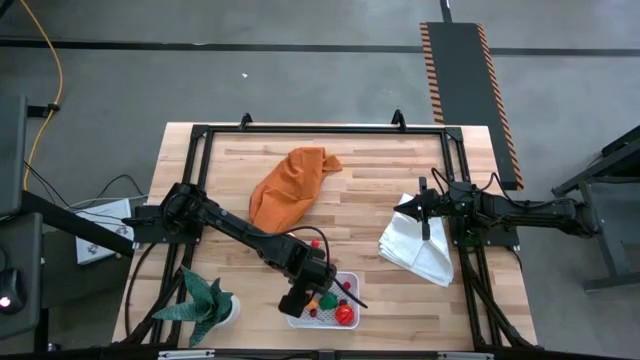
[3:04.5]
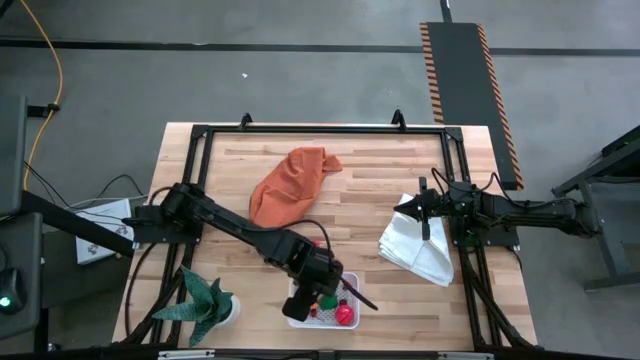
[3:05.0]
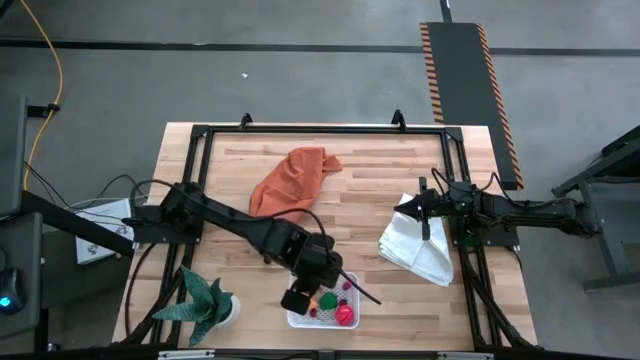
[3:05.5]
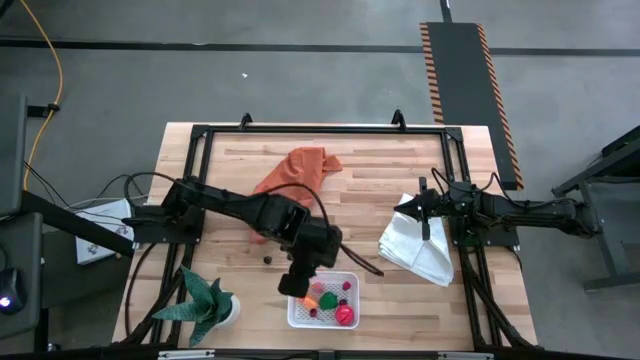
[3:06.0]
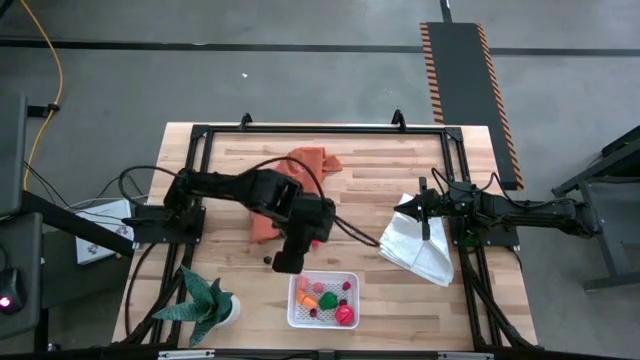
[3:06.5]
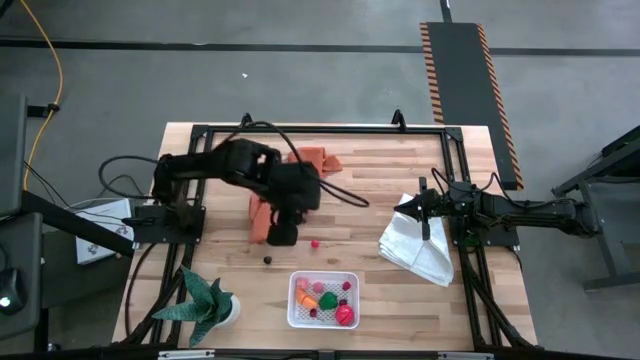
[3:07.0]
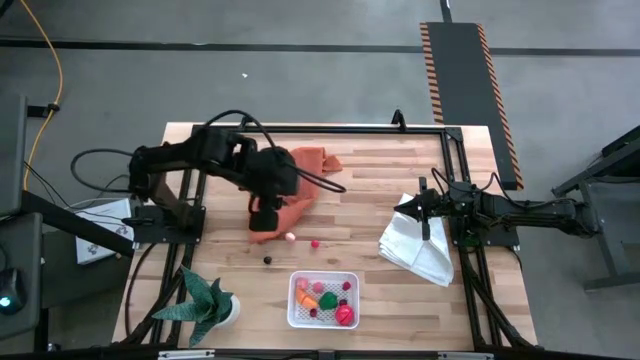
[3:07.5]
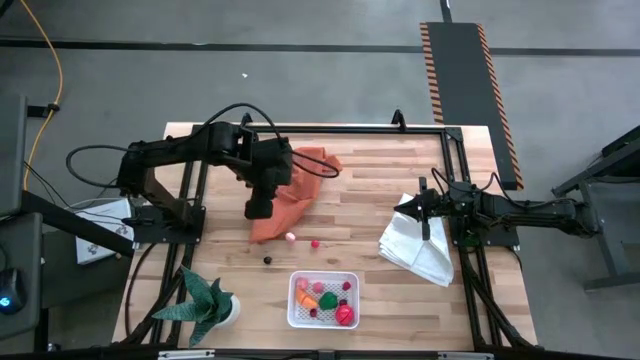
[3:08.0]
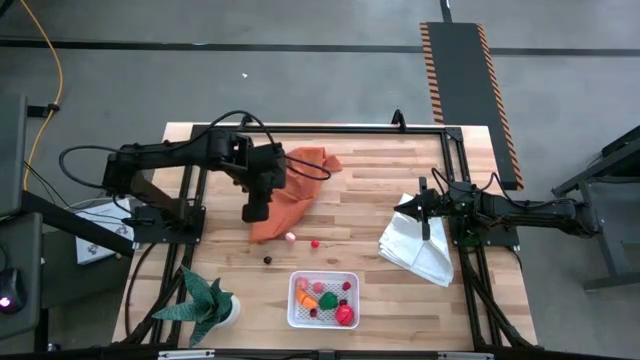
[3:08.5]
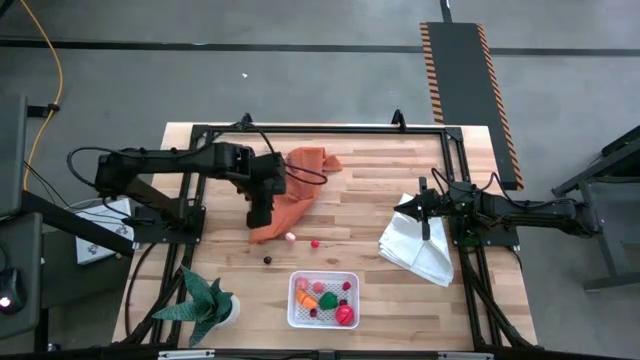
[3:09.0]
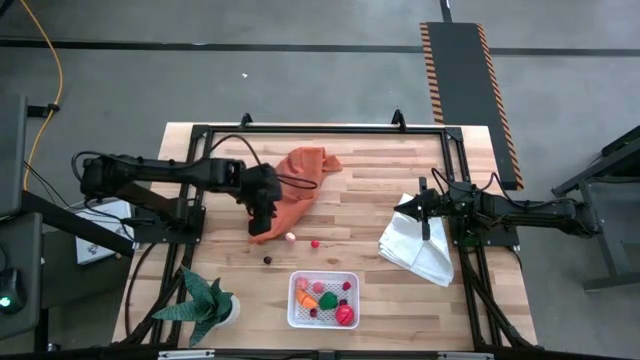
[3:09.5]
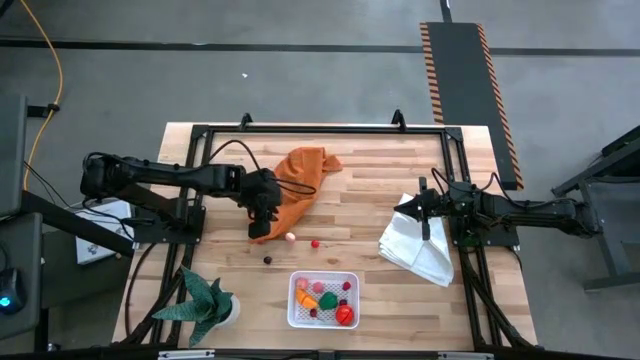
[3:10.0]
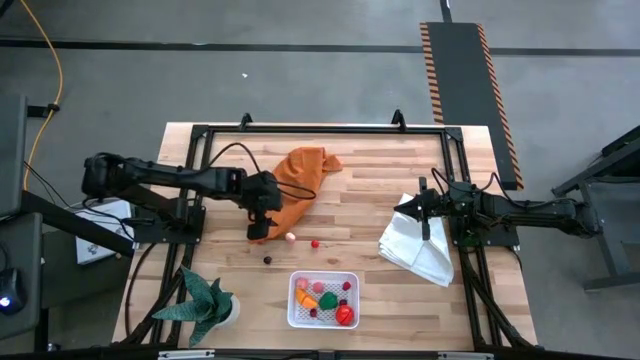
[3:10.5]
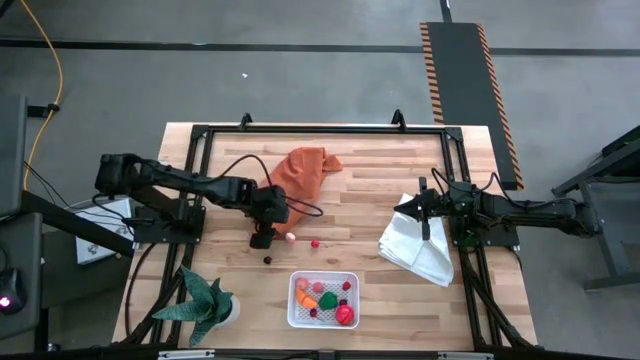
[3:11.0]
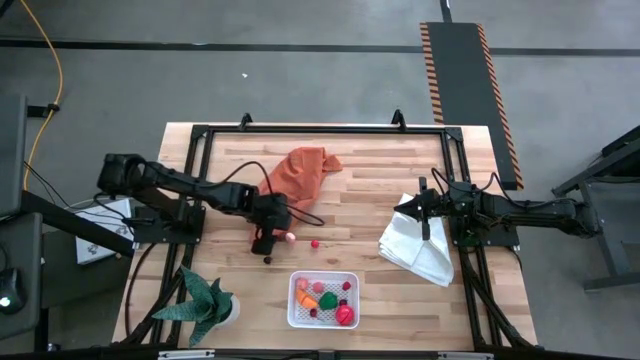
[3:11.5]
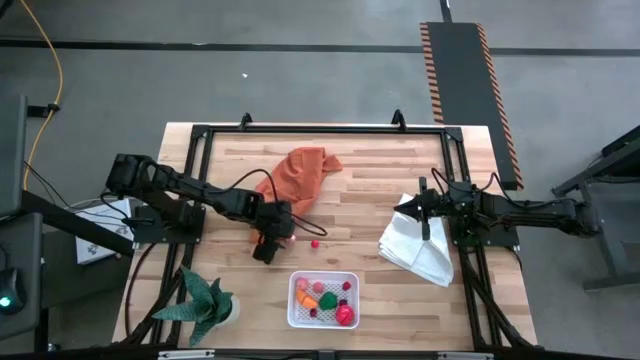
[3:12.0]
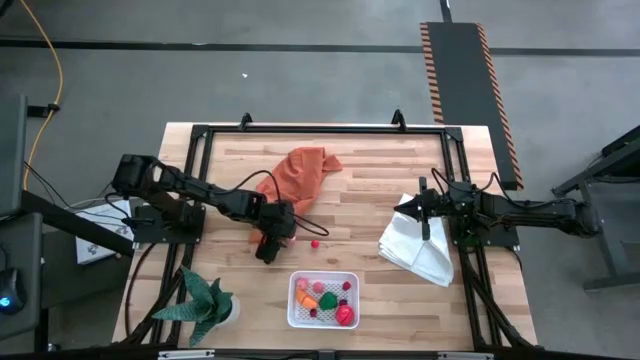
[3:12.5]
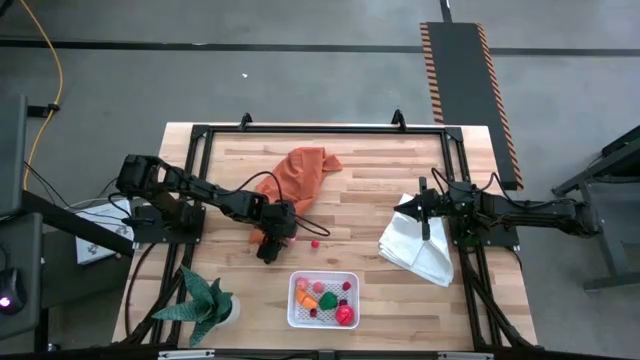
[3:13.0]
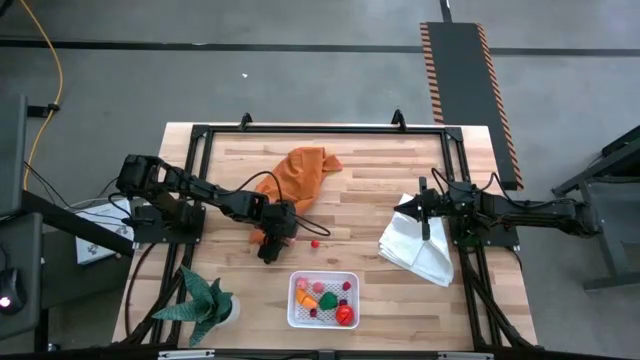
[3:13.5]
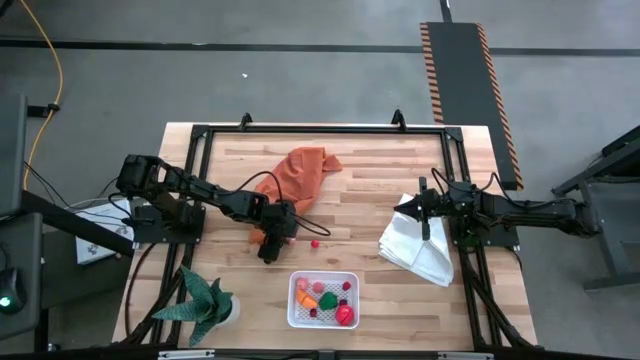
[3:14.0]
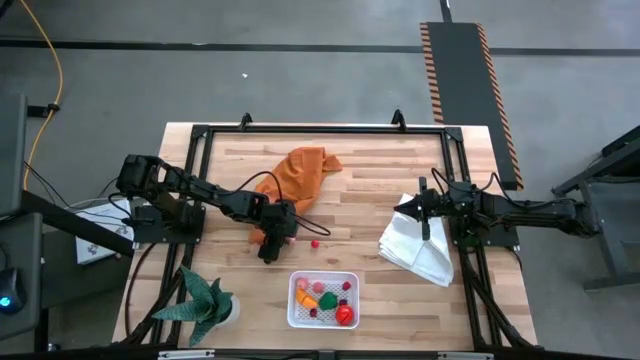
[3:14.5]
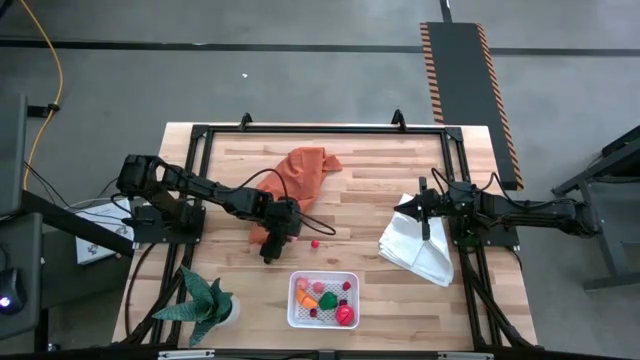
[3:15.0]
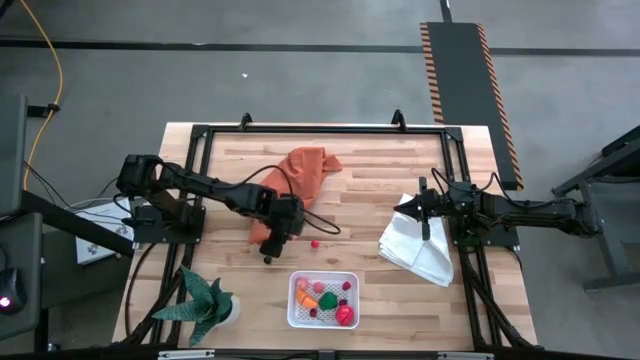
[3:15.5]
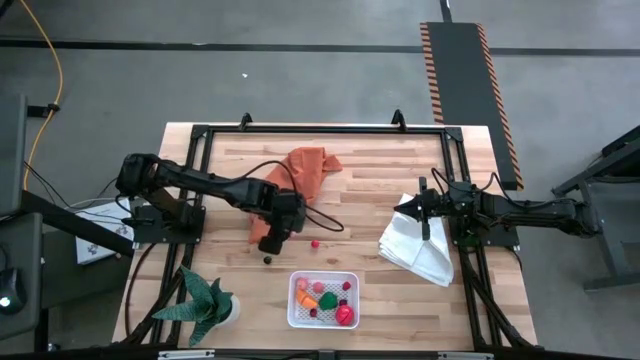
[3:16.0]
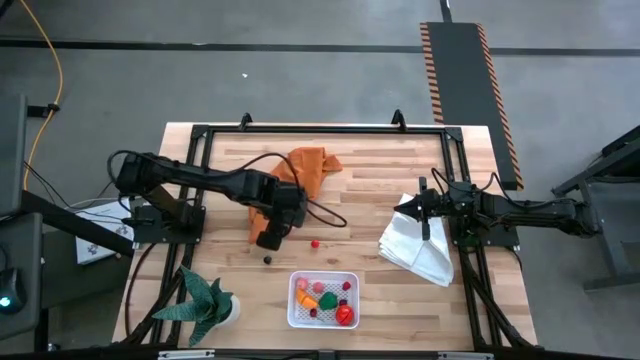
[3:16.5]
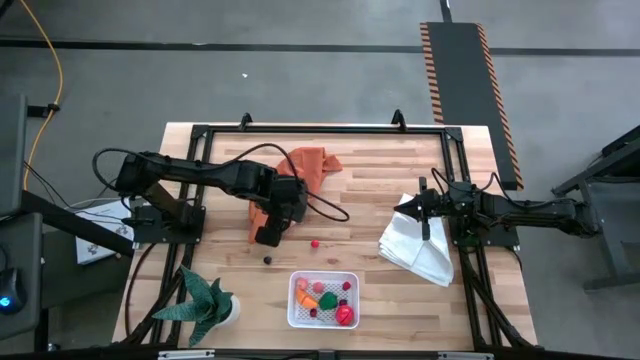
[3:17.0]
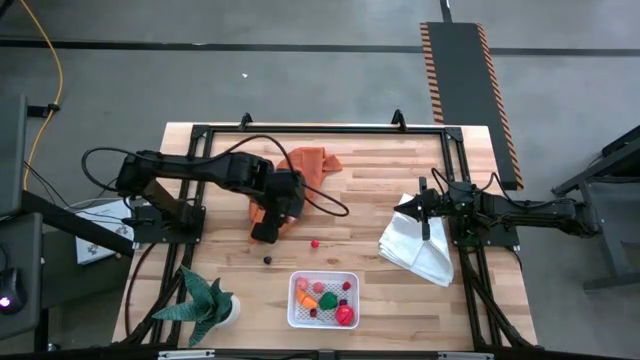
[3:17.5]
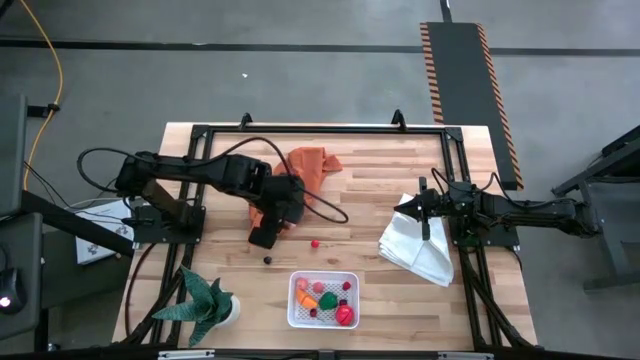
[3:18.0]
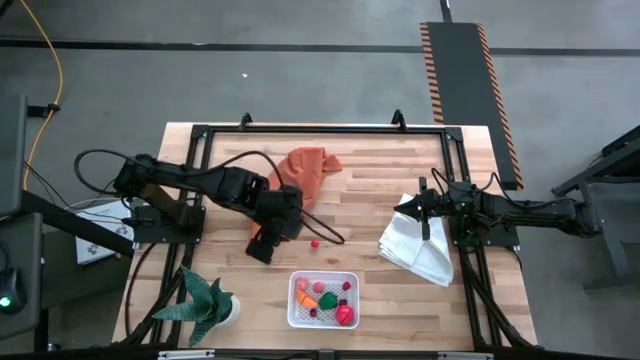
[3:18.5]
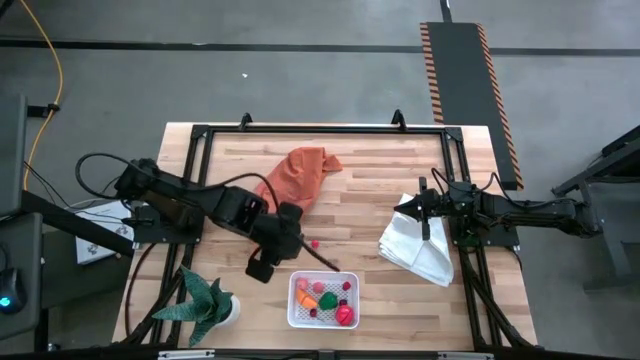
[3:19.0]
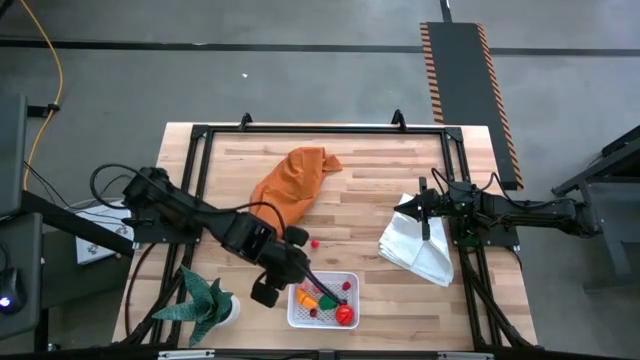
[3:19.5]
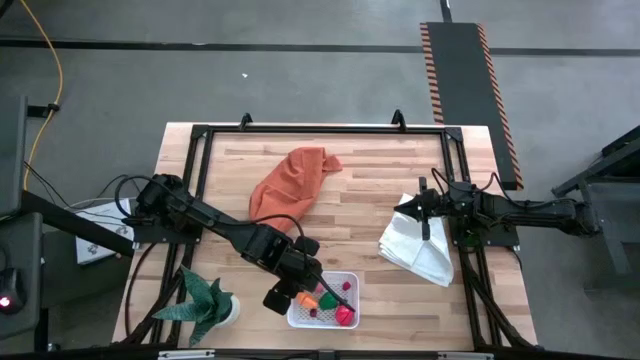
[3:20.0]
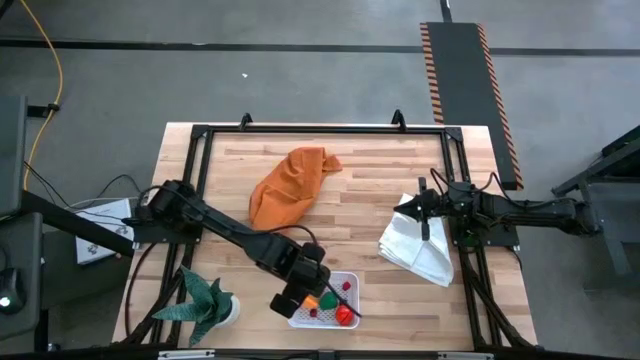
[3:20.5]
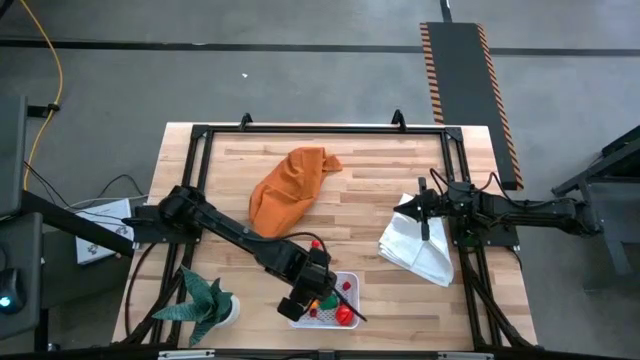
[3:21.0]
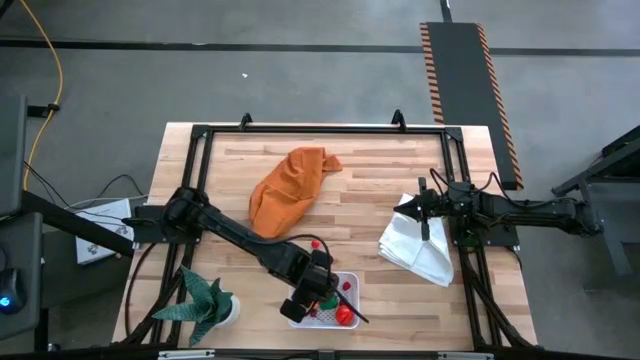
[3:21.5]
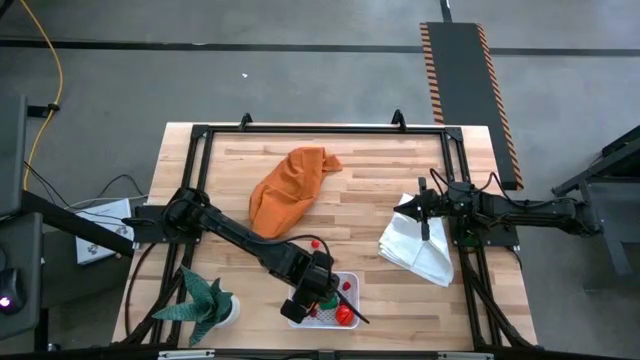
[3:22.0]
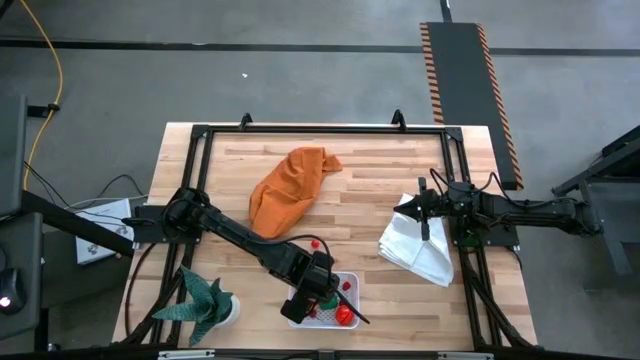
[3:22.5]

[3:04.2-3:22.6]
Task: Pick and placing Produce into tupperware
Put the peach into the white bin

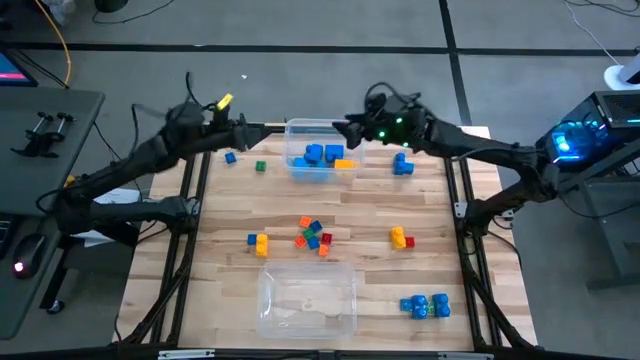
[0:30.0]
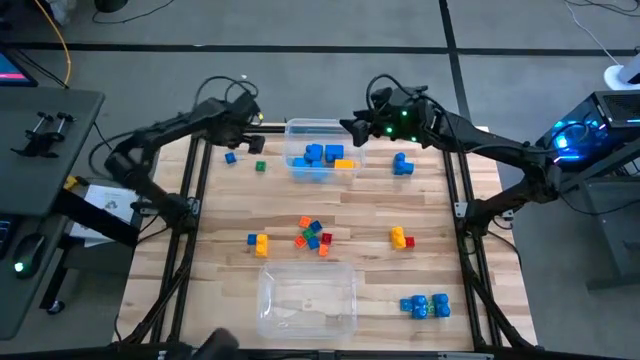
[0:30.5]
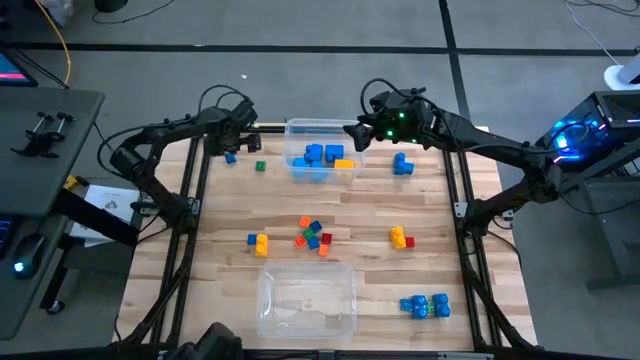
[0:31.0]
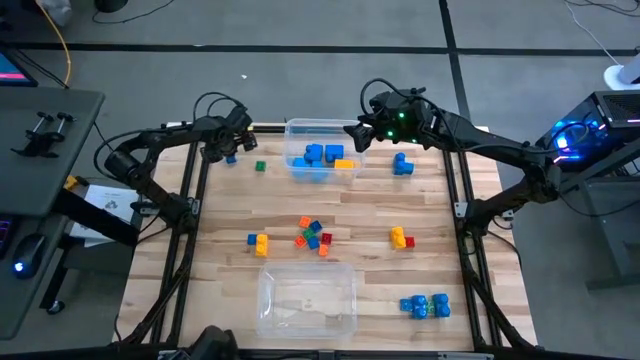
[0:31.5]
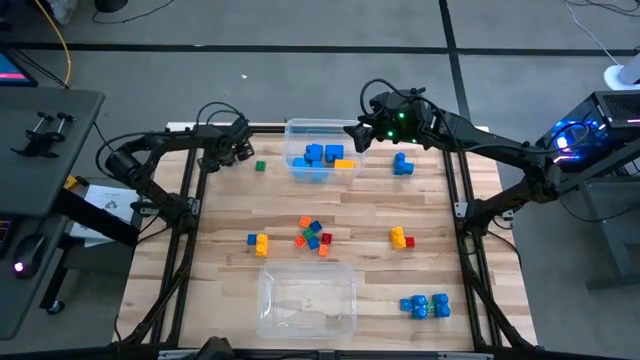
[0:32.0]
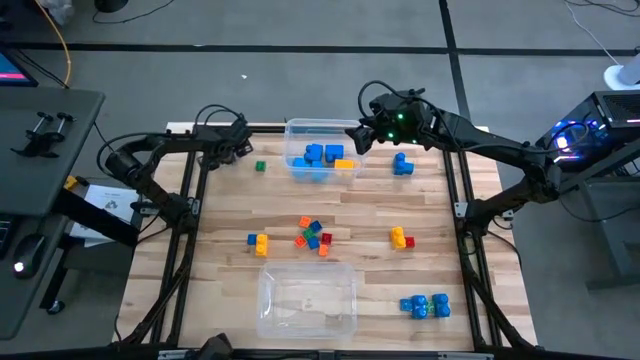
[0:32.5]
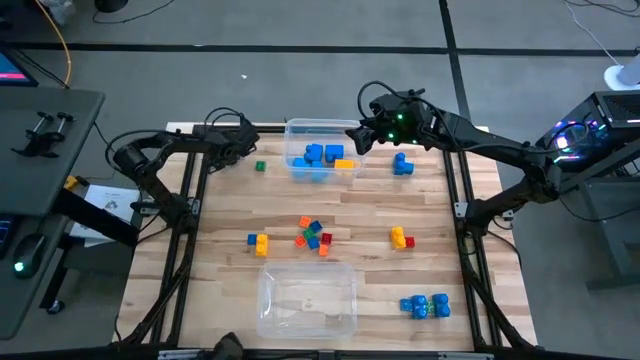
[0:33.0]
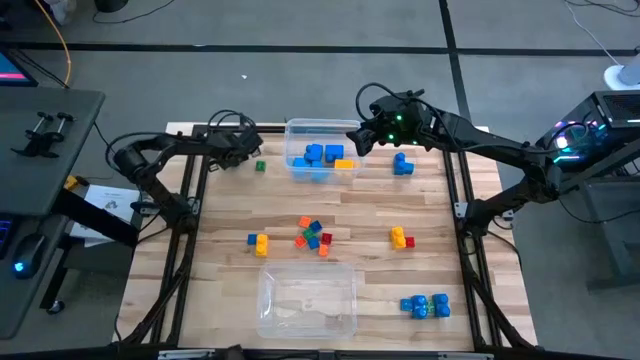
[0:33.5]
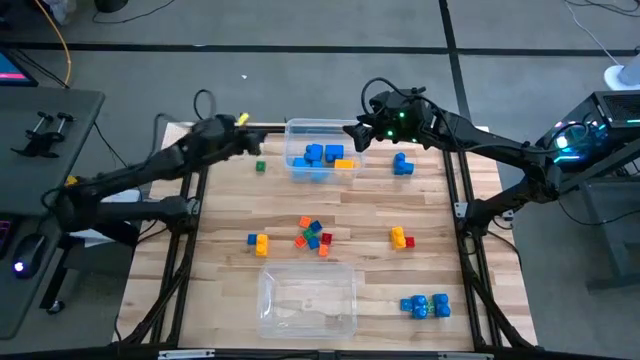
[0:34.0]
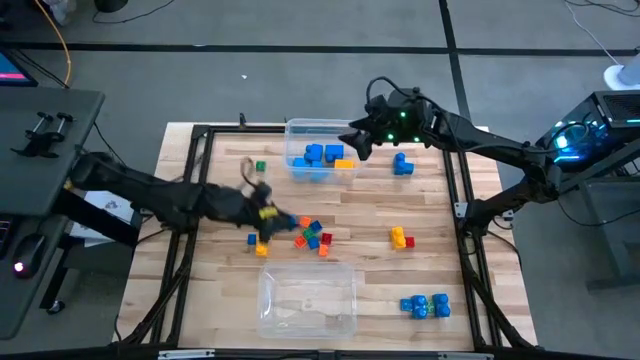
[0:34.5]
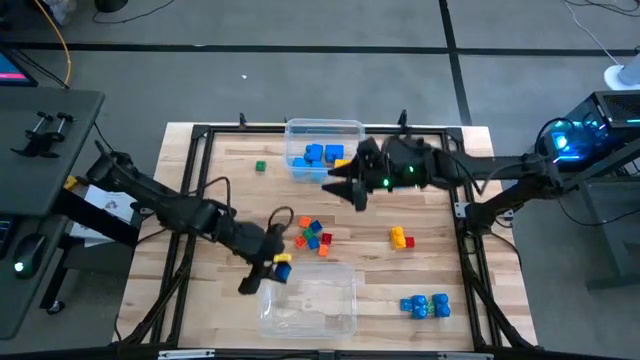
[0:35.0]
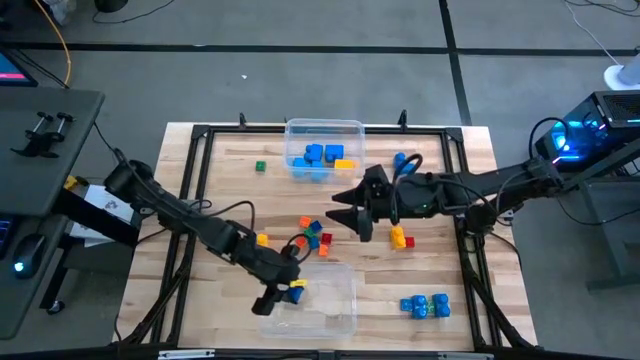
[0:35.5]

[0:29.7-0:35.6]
Task: Sort blocks by size
Put the small blue game piece into the bottom transparent bin
